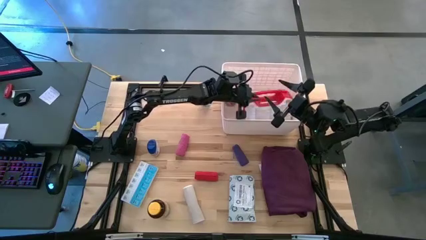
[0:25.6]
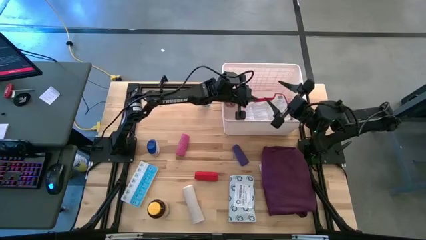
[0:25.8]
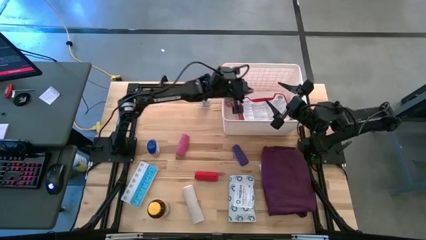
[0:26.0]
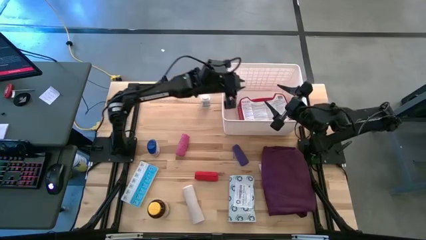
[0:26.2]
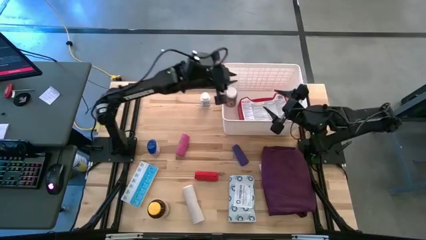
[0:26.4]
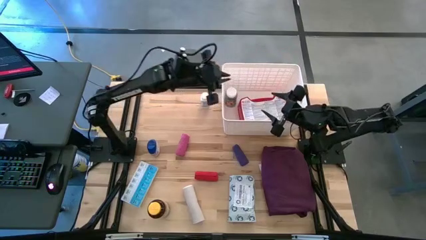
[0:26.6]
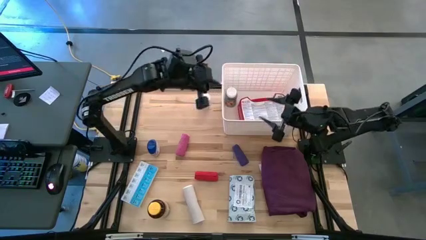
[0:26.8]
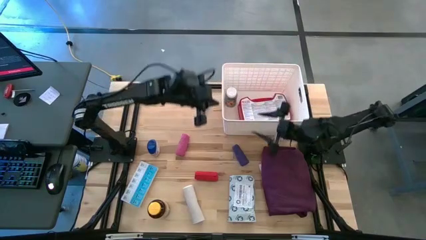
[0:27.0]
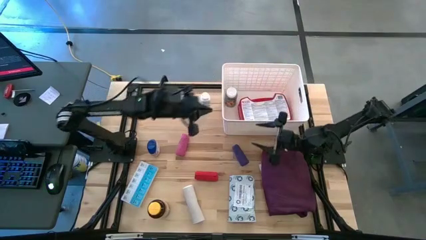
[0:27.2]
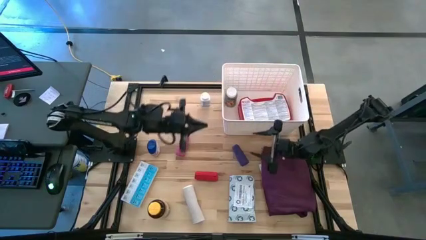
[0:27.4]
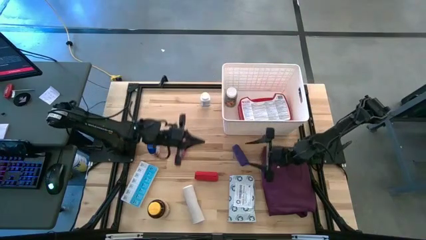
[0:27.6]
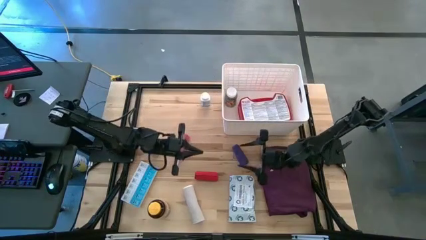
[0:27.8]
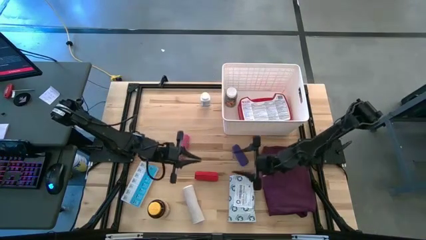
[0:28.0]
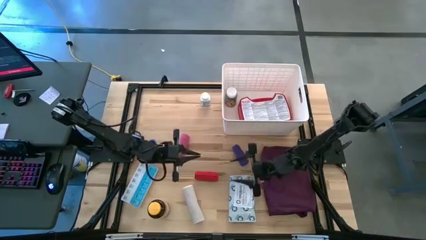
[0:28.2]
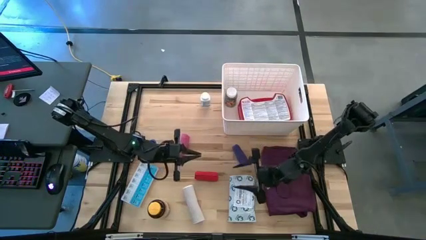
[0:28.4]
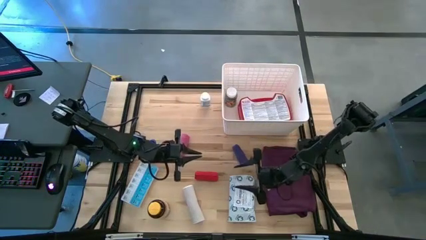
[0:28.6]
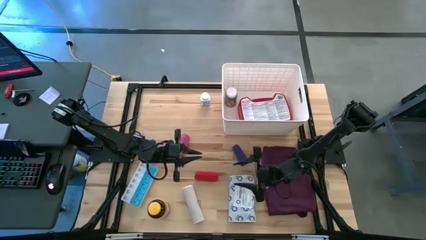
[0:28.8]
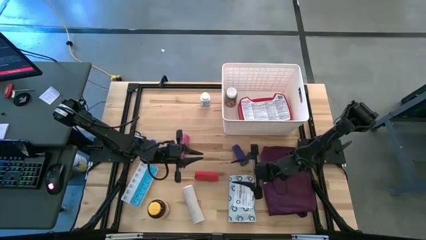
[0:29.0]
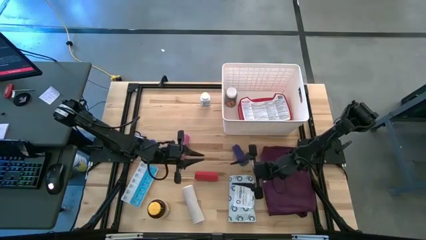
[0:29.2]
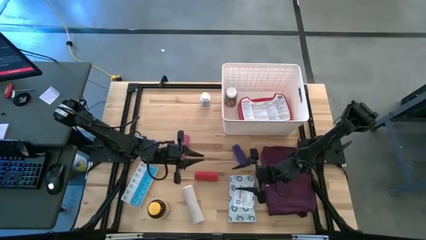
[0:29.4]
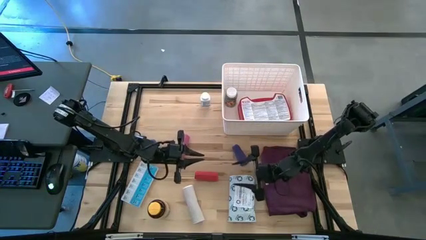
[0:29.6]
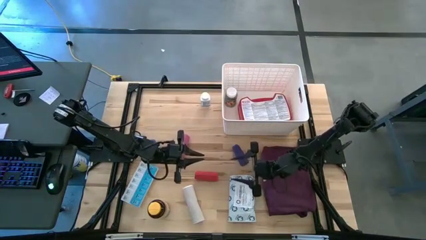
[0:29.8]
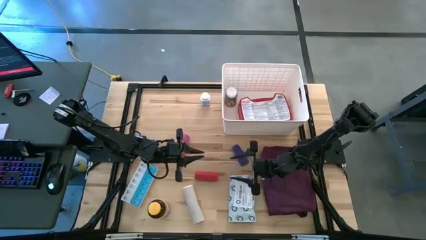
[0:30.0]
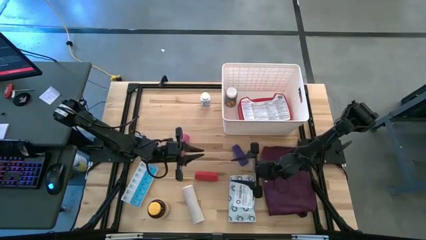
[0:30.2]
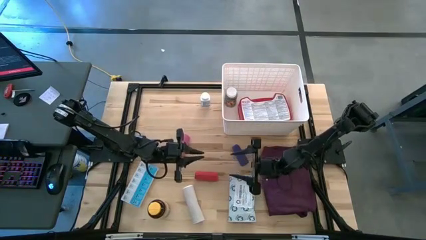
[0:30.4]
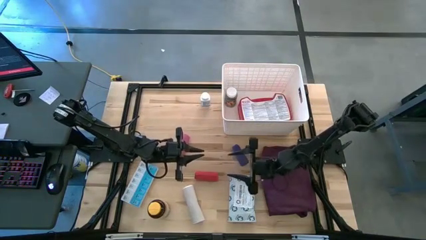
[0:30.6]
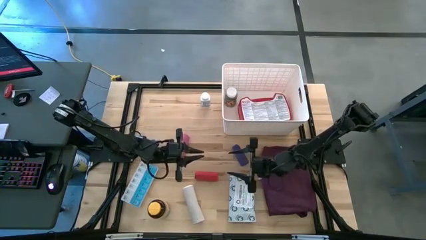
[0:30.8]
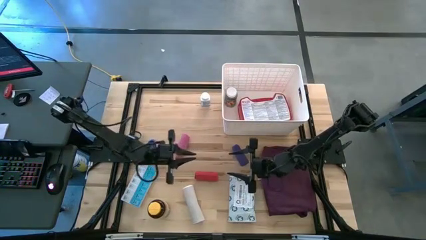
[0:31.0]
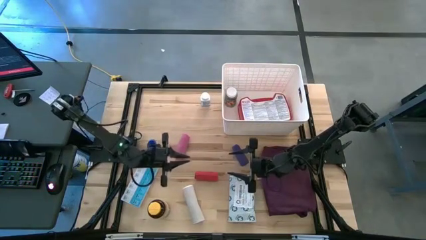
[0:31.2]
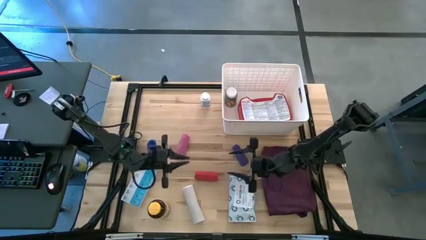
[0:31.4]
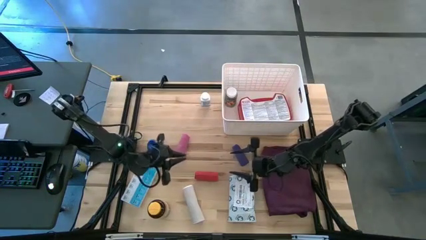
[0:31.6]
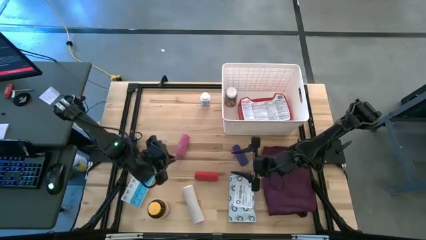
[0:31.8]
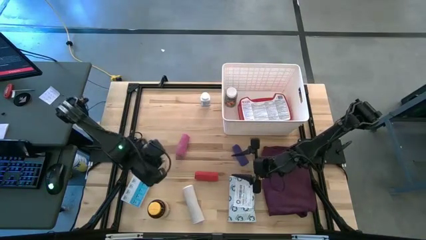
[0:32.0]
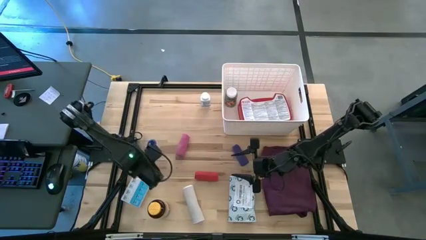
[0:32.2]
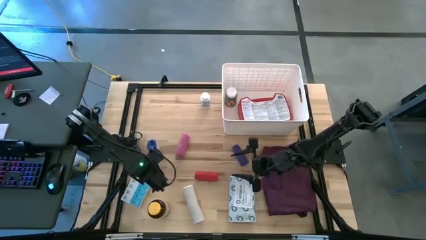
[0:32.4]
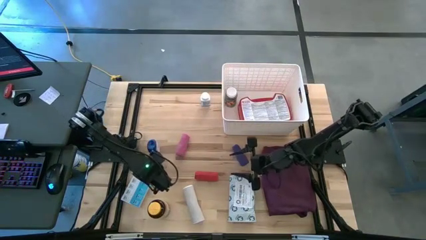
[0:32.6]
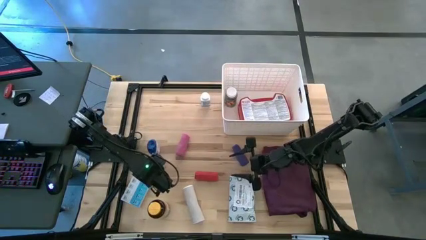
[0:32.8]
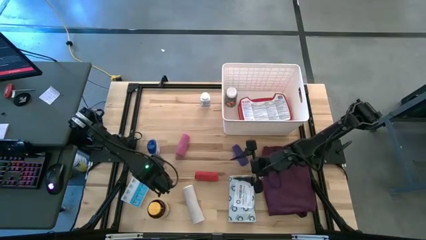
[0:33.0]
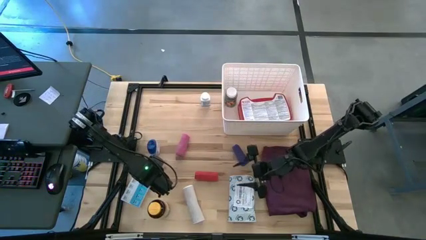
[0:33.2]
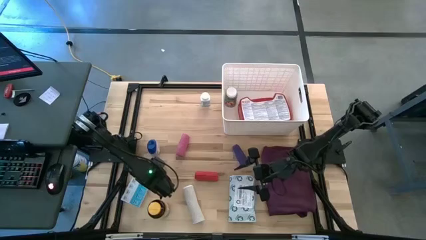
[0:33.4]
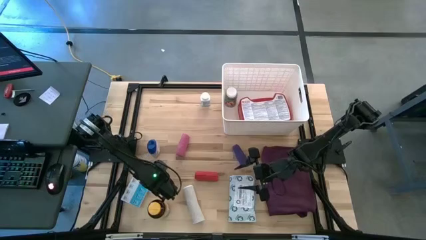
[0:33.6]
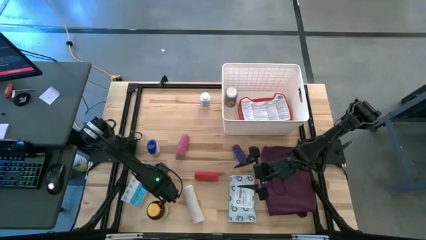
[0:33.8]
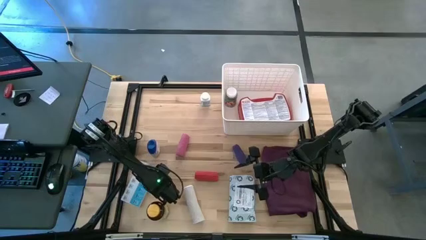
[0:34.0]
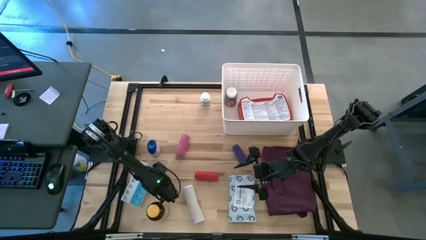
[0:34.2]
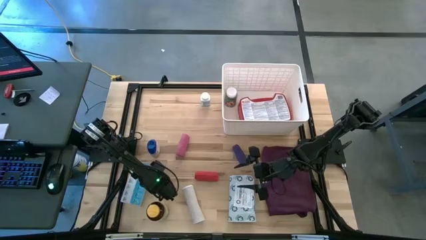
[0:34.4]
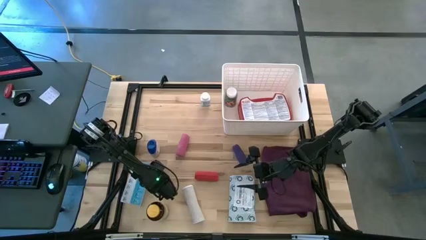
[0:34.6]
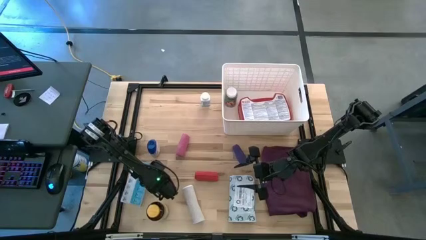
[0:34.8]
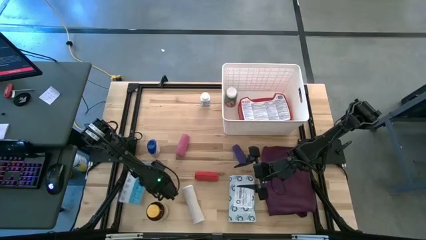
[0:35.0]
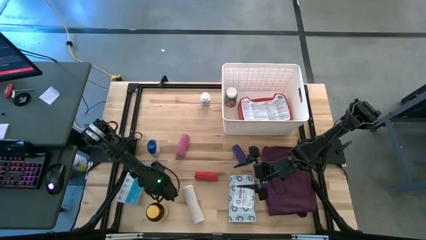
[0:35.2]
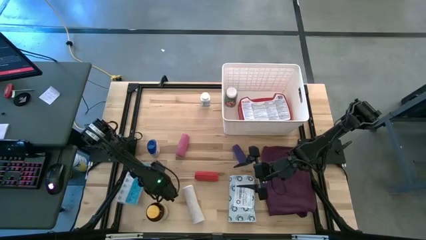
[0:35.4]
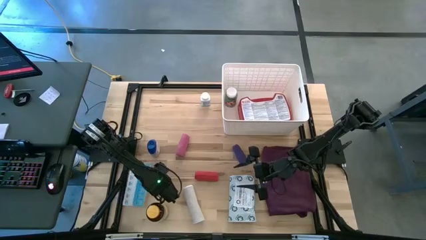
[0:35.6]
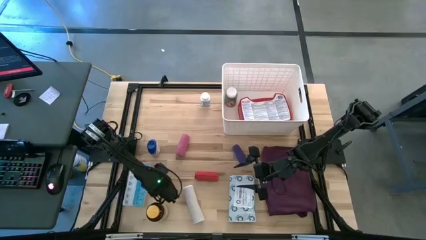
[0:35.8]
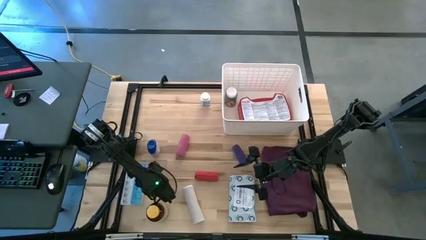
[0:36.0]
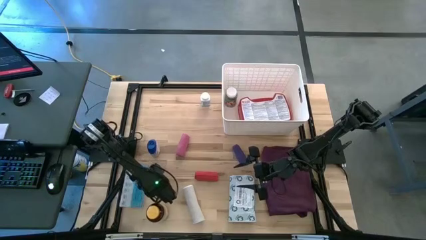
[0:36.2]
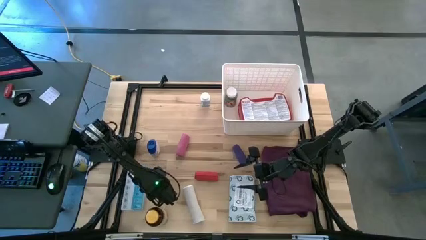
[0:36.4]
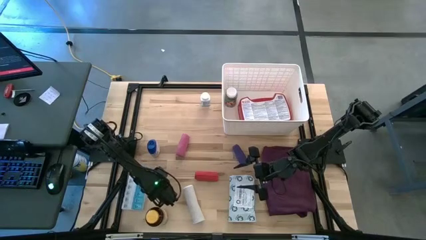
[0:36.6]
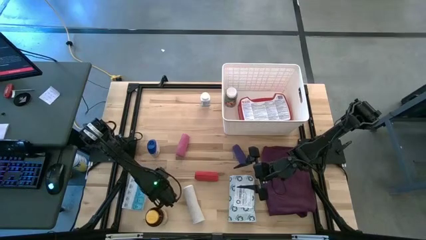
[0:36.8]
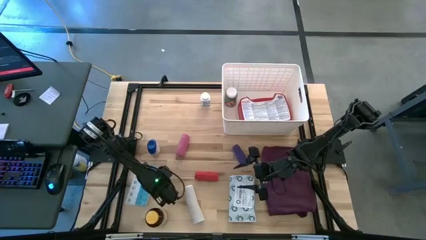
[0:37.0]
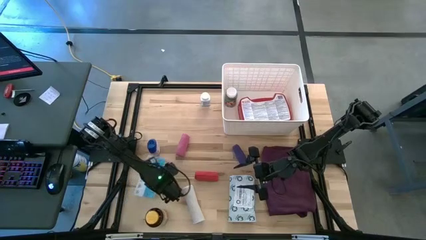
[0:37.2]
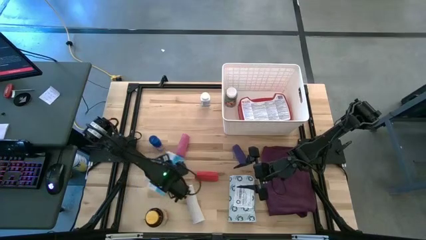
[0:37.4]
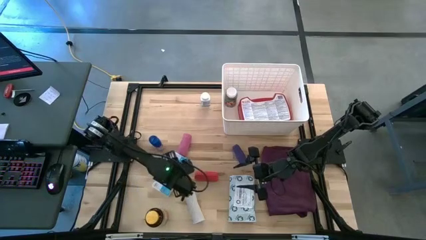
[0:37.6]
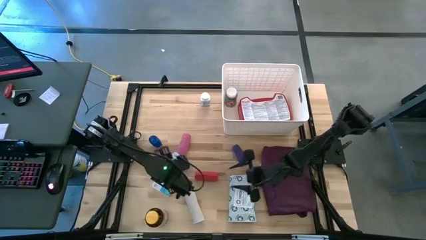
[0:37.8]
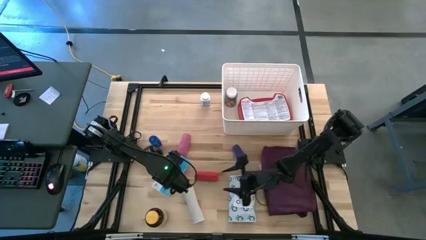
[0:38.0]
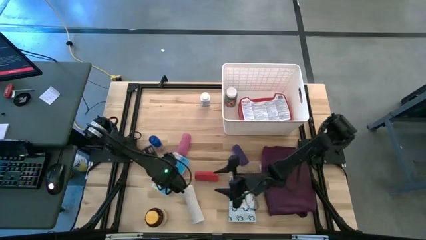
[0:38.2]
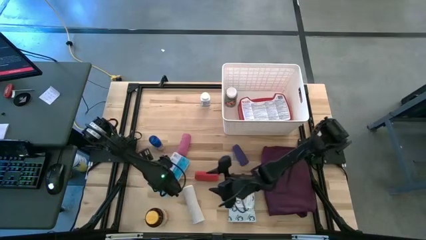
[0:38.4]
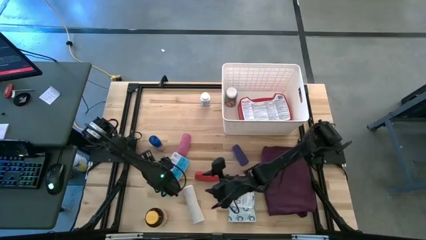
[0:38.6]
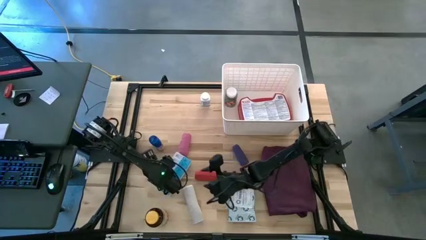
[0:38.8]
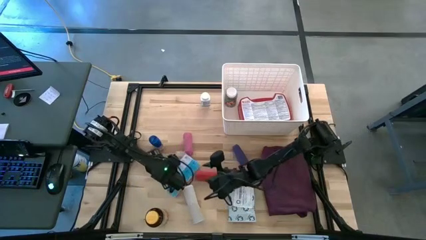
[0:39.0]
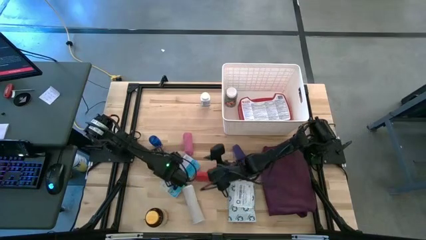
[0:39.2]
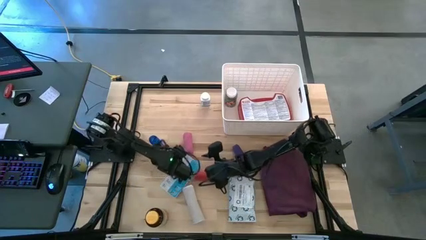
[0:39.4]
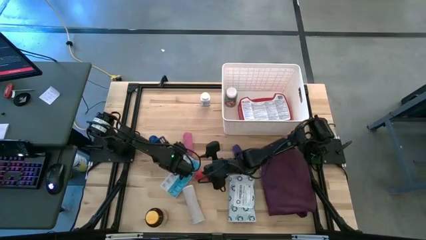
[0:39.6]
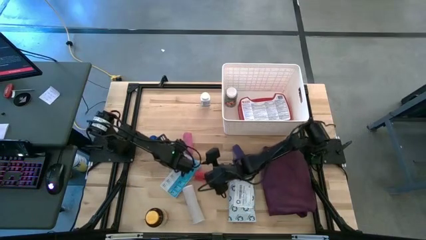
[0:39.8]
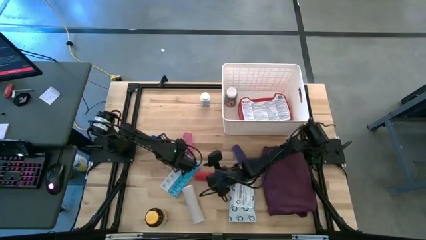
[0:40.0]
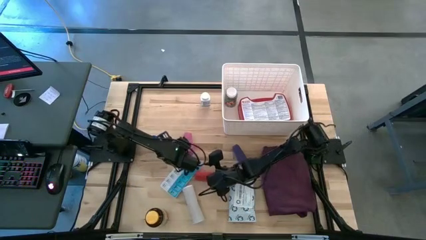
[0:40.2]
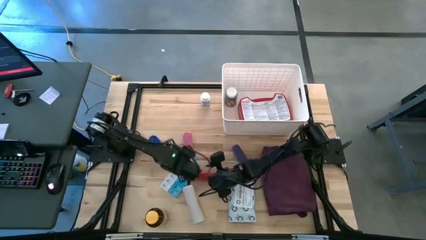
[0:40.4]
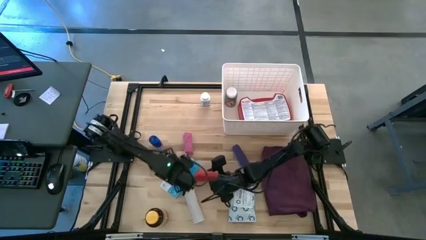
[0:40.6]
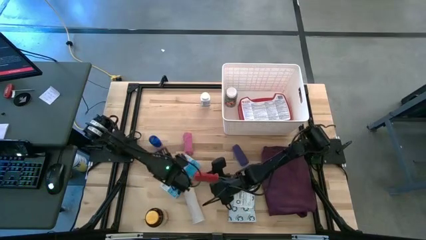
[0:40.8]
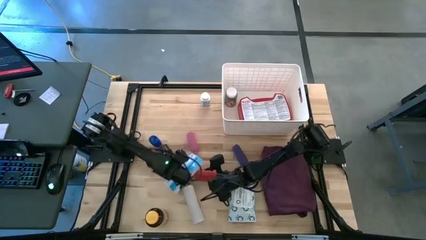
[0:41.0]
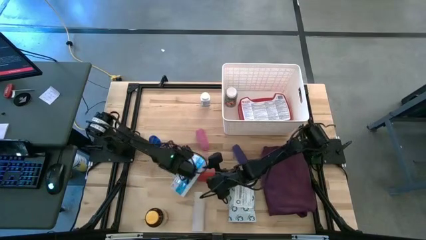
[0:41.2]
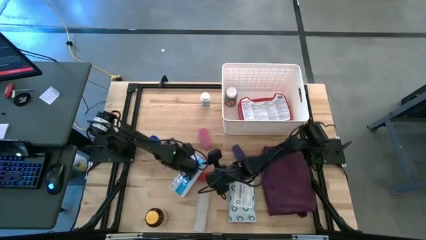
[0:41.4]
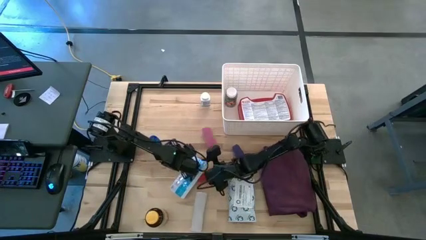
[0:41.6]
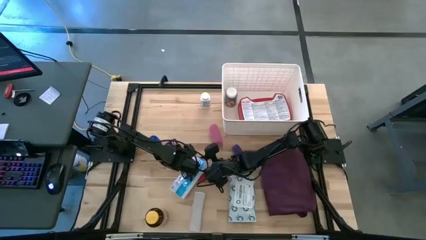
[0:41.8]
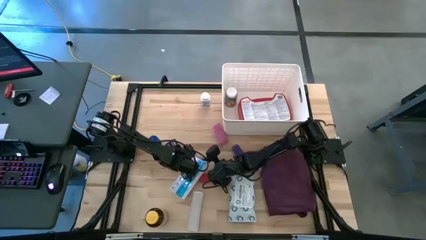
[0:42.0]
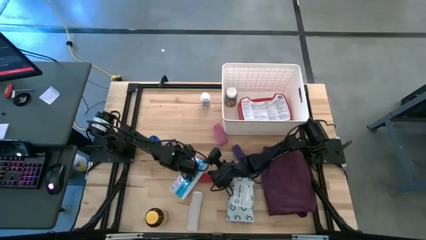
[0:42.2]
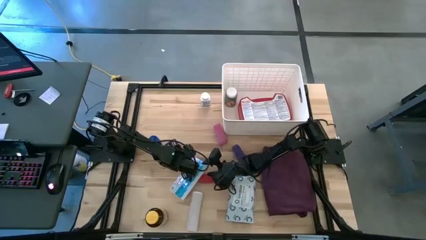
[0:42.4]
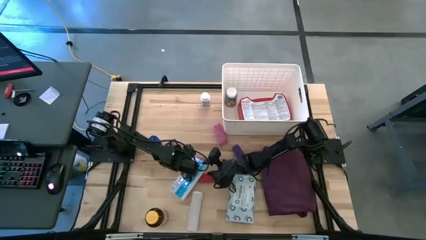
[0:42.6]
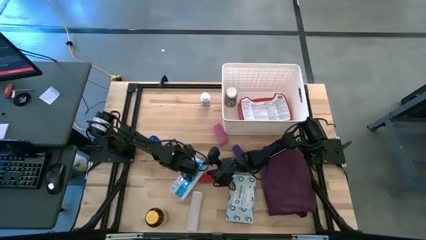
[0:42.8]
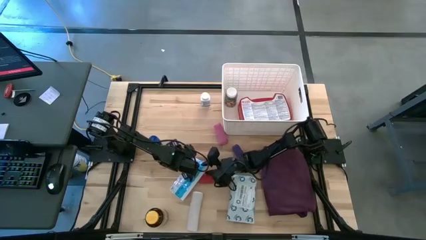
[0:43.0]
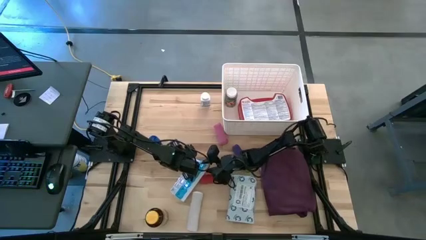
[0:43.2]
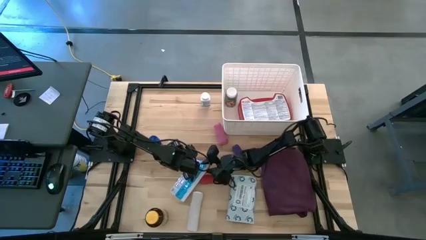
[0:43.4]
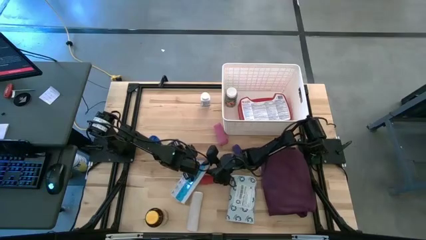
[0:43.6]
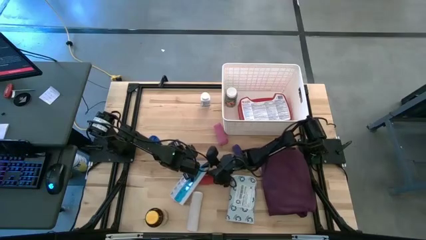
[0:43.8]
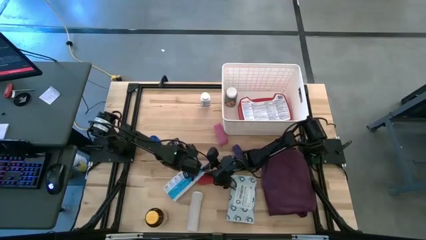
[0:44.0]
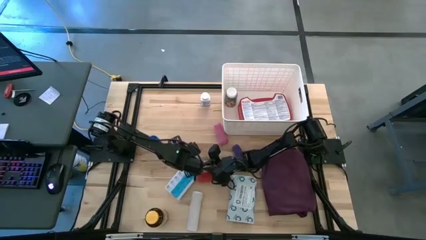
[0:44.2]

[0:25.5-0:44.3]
Task: Pick & place medical supplies in basket/bin
Put the white medicine organizer into the white container
